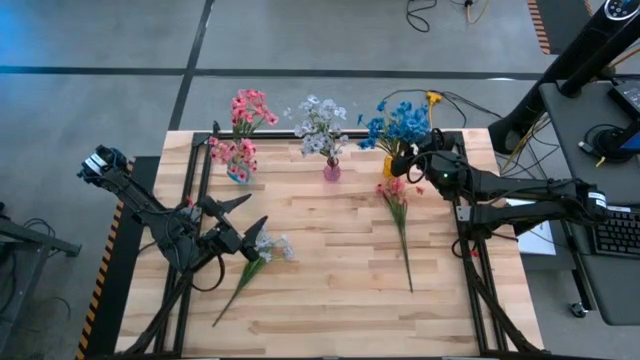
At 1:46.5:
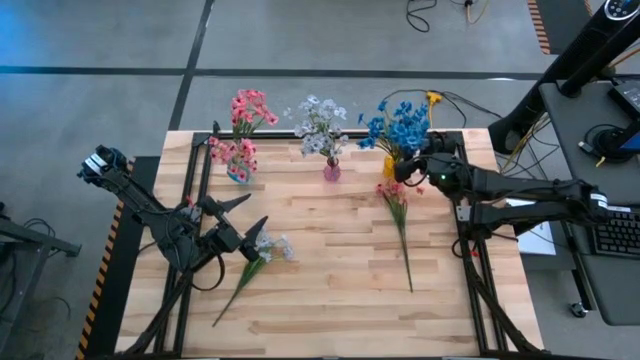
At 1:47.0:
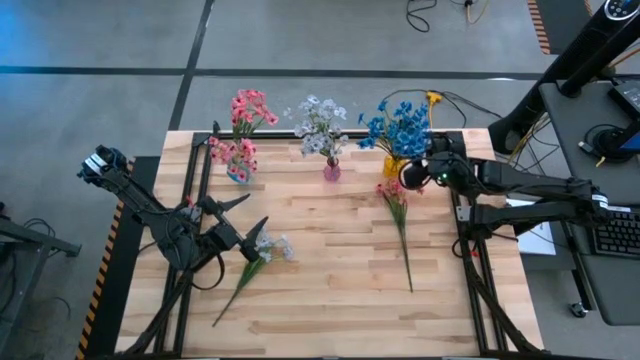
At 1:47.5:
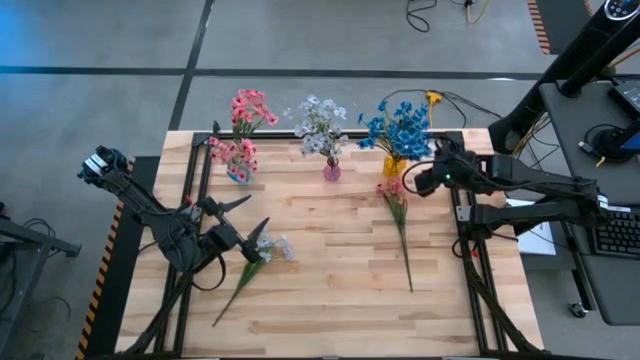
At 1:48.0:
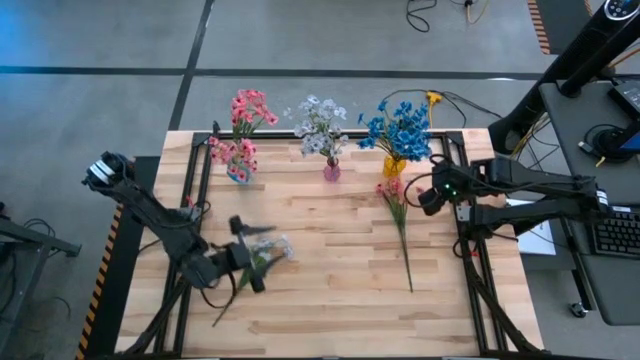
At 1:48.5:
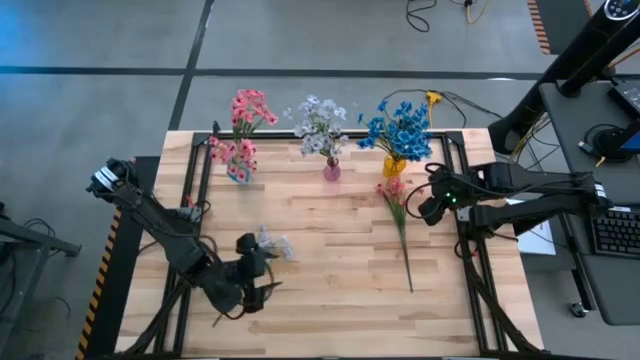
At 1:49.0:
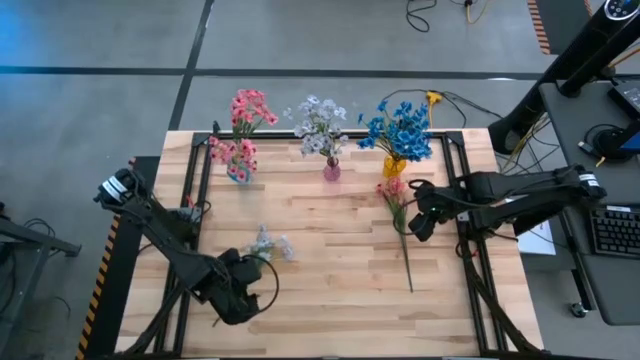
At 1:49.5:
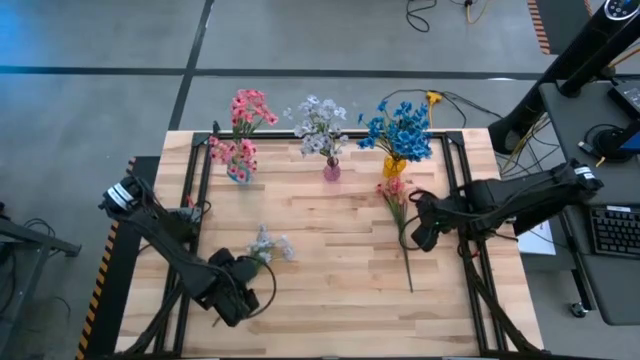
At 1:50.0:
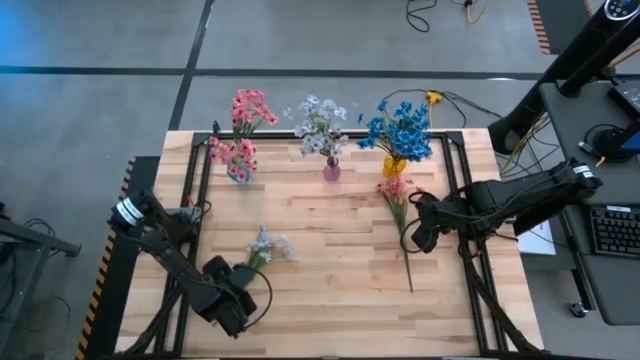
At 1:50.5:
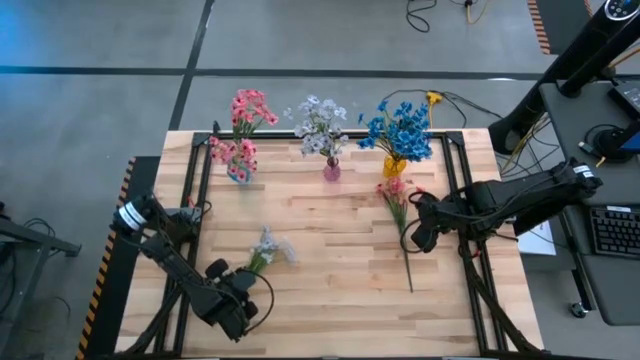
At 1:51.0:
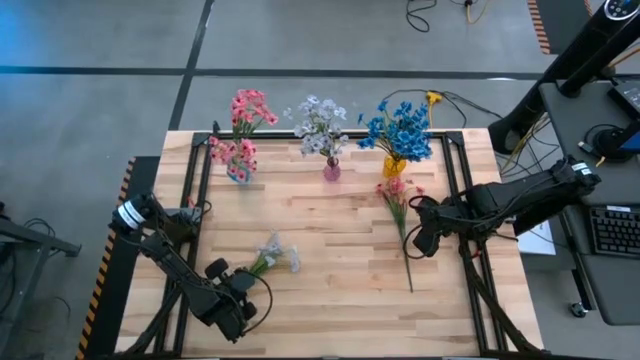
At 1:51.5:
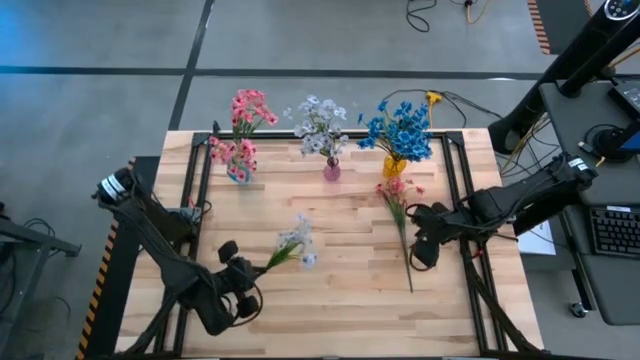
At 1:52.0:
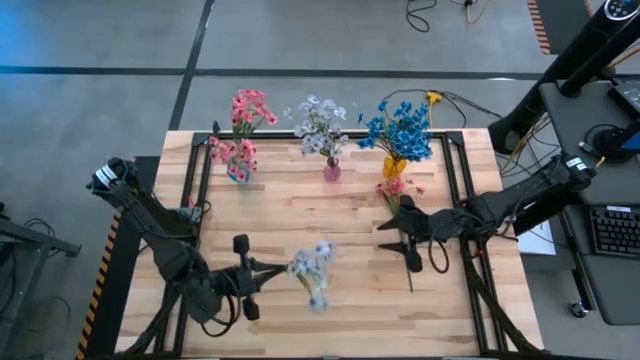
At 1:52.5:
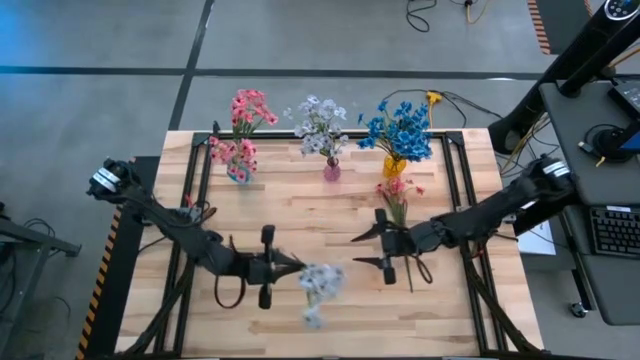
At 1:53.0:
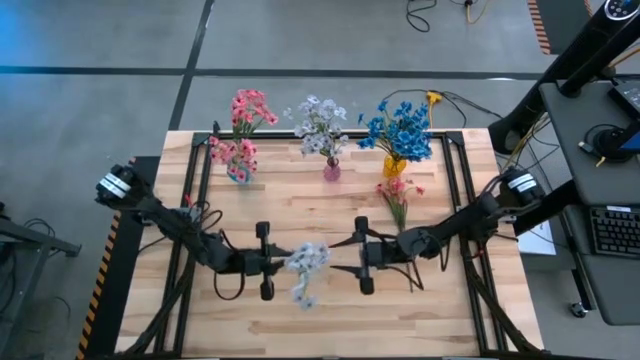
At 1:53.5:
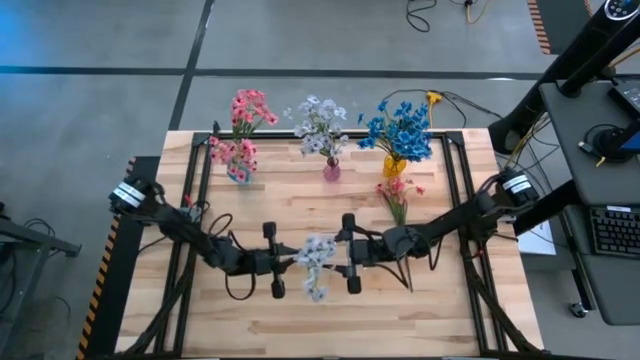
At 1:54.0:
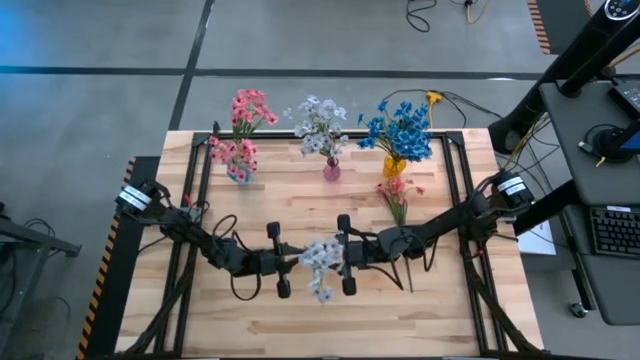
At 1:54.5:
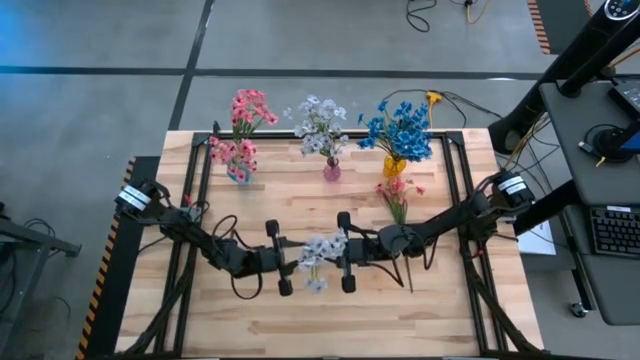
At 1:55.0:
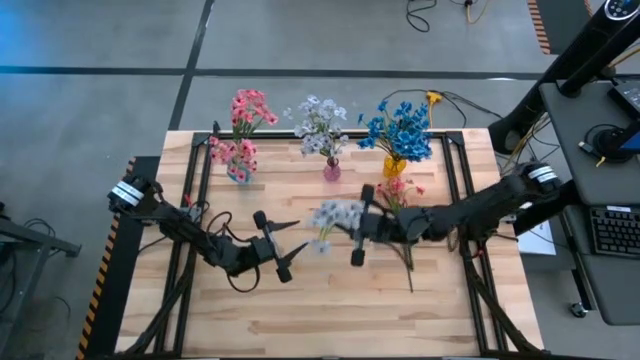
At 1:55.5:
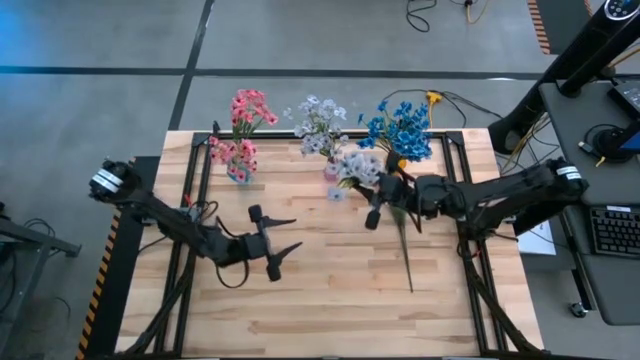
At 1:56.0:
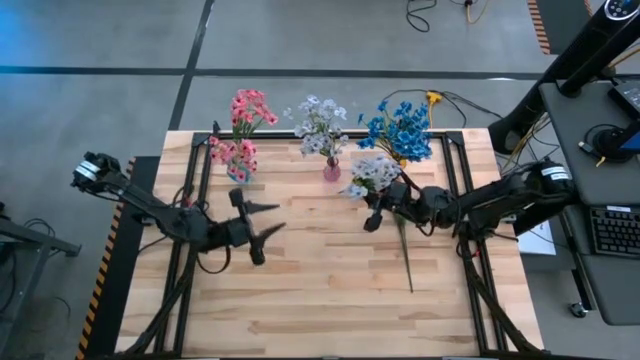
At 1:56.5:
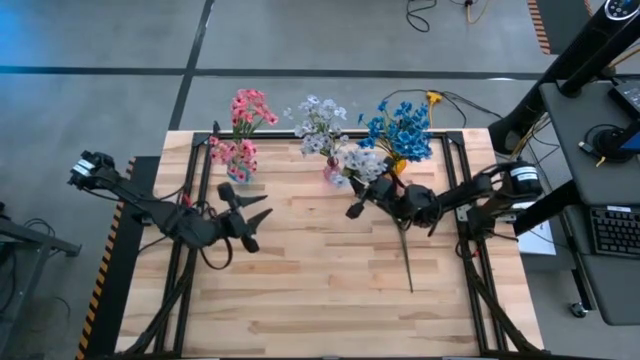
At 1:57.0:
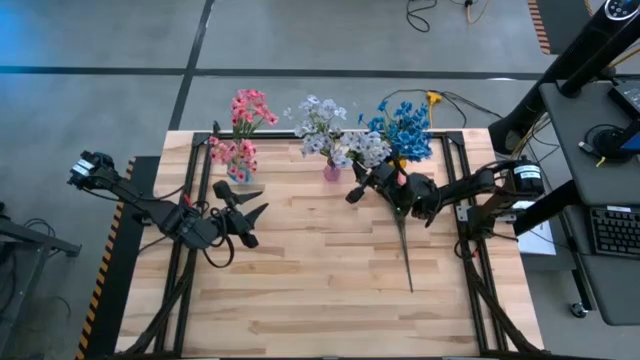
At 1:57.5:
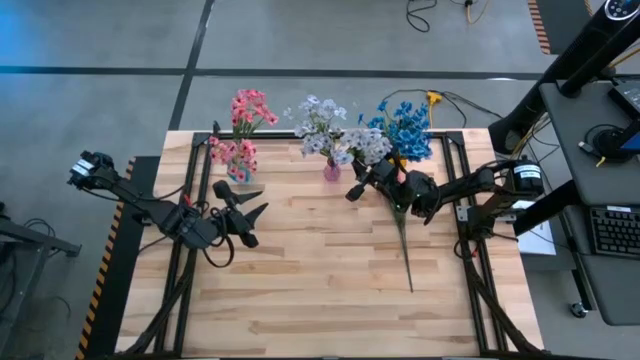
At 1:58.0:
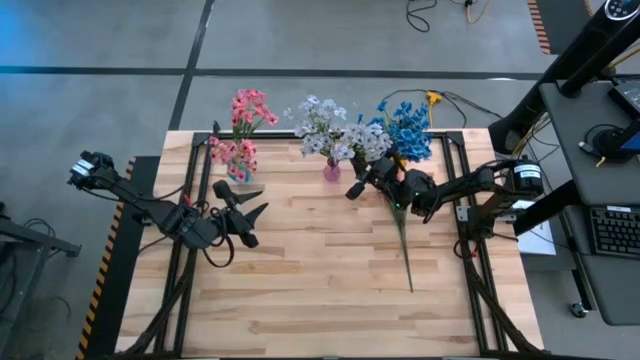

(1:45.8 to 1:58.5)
Task: Sort flowers into vase by color
Put the white flowers into the pink vase

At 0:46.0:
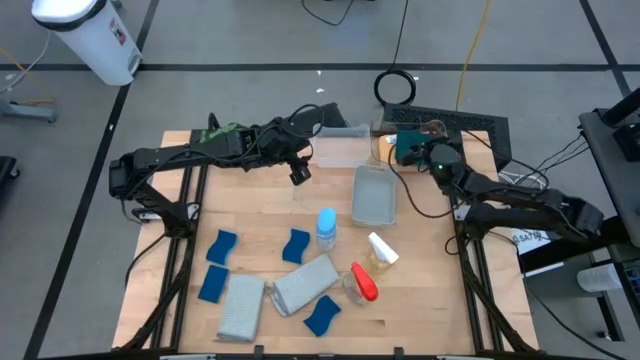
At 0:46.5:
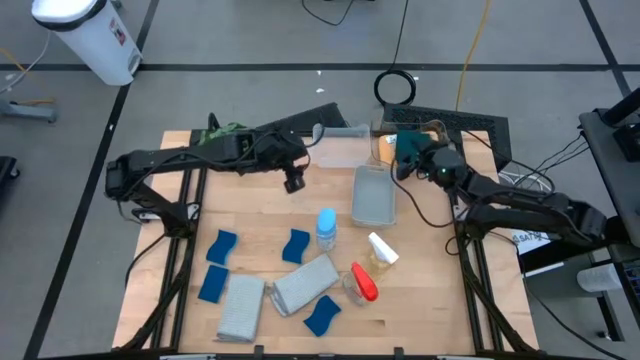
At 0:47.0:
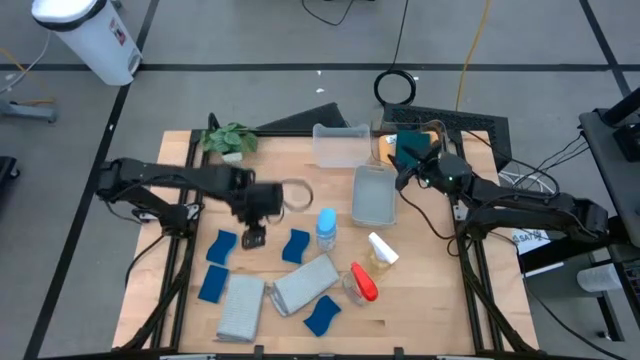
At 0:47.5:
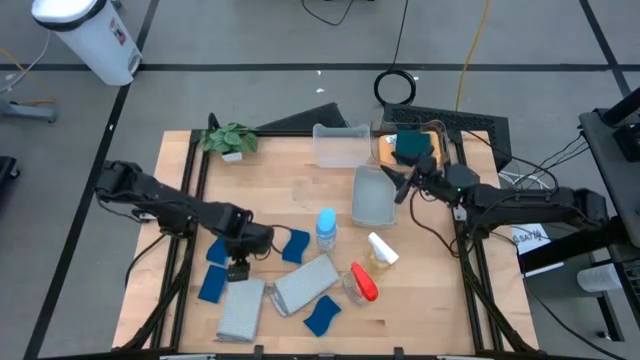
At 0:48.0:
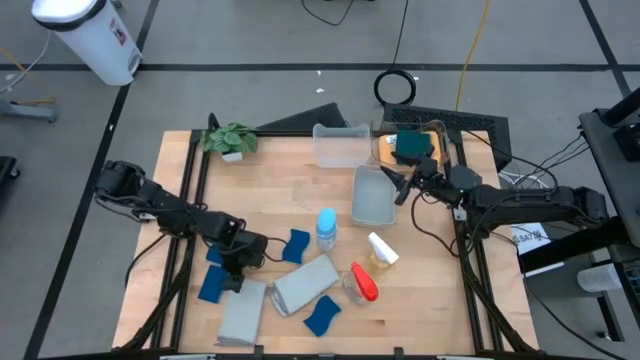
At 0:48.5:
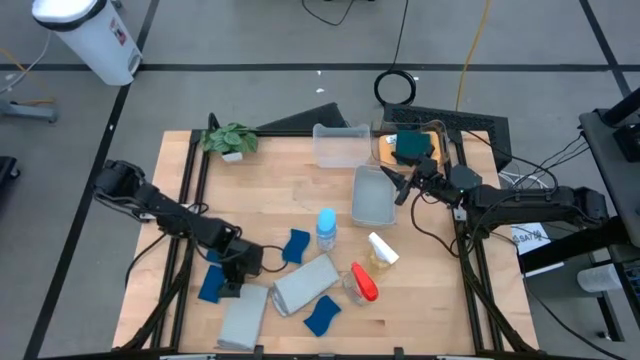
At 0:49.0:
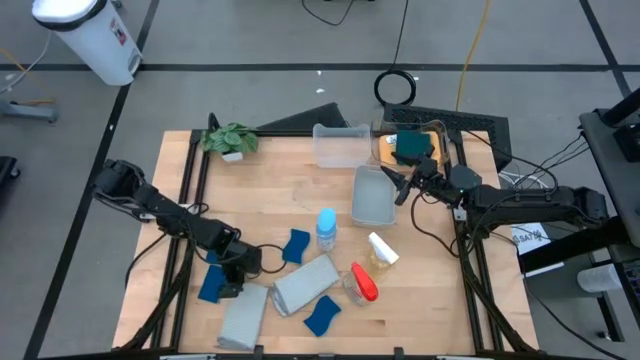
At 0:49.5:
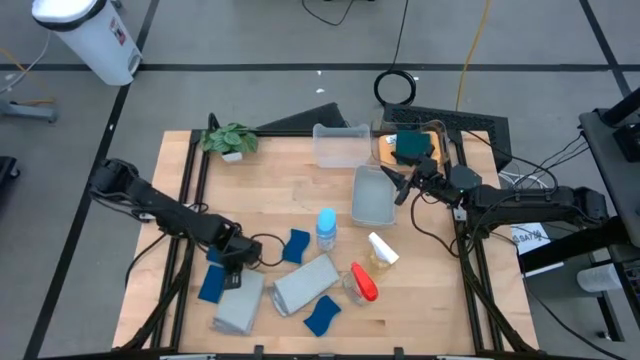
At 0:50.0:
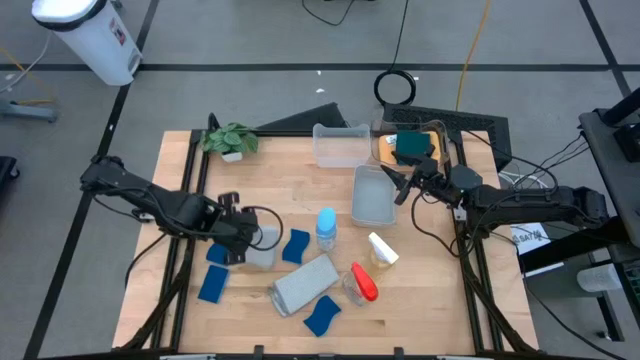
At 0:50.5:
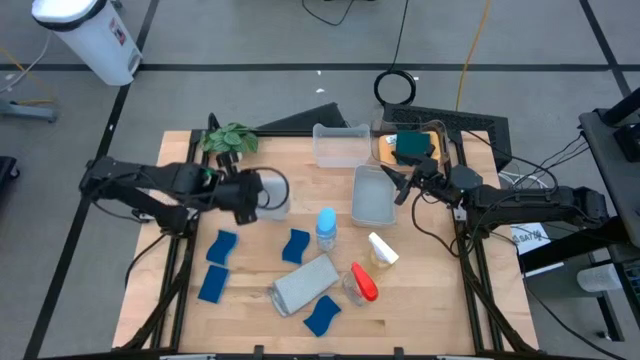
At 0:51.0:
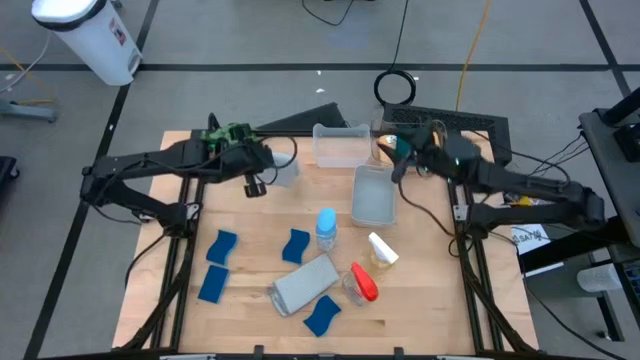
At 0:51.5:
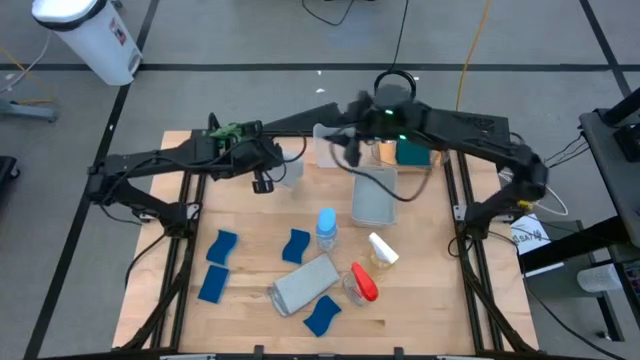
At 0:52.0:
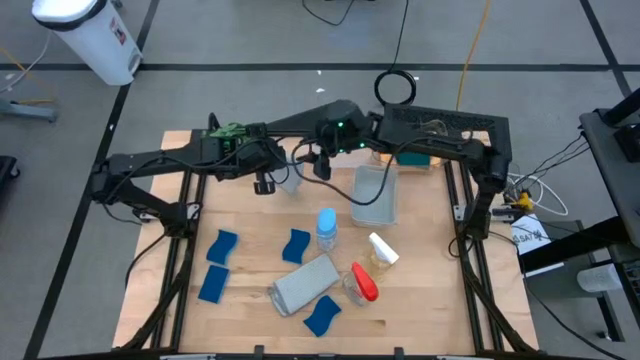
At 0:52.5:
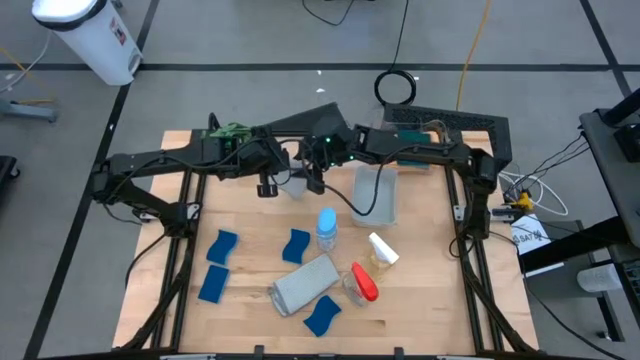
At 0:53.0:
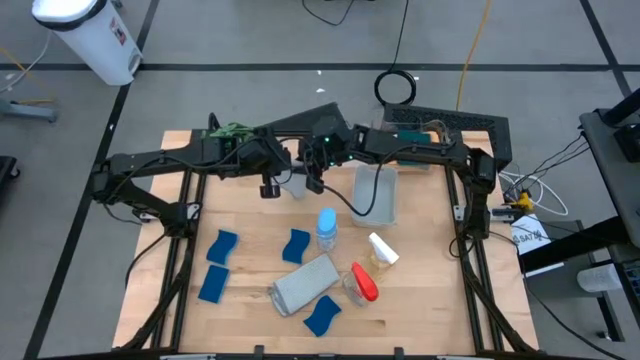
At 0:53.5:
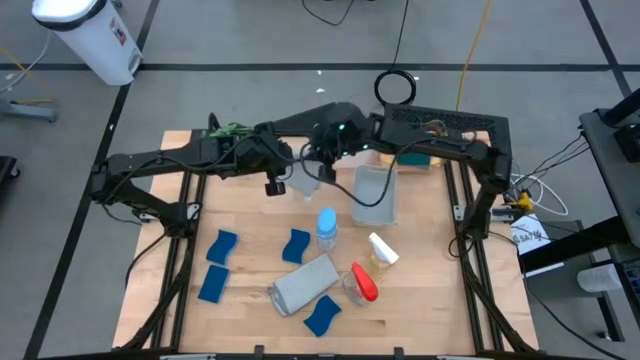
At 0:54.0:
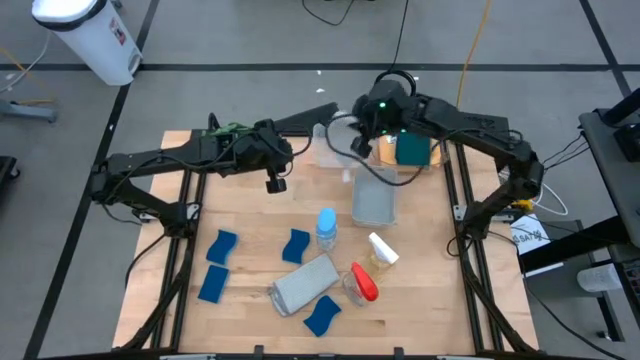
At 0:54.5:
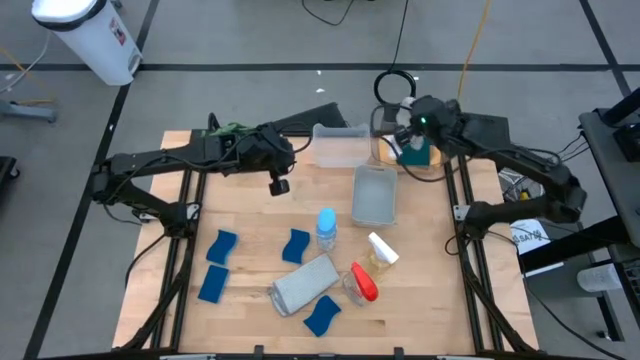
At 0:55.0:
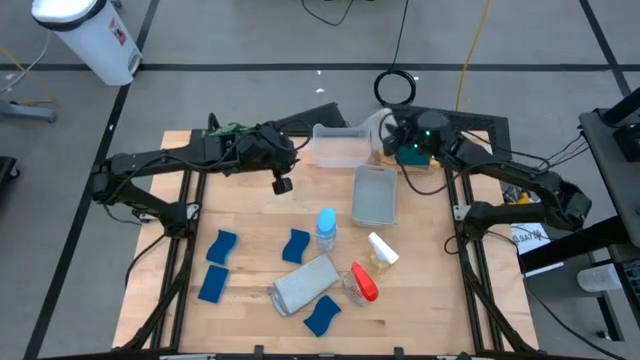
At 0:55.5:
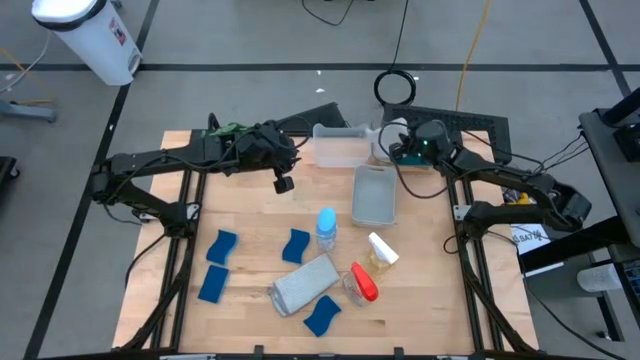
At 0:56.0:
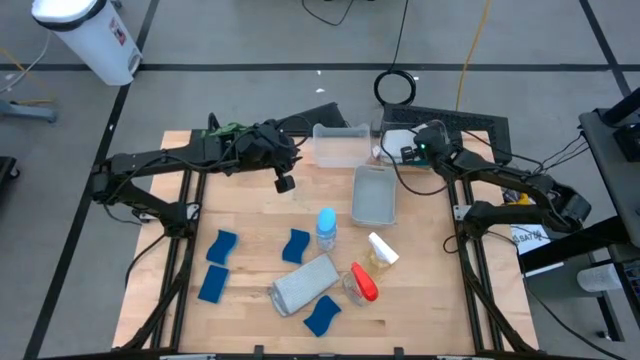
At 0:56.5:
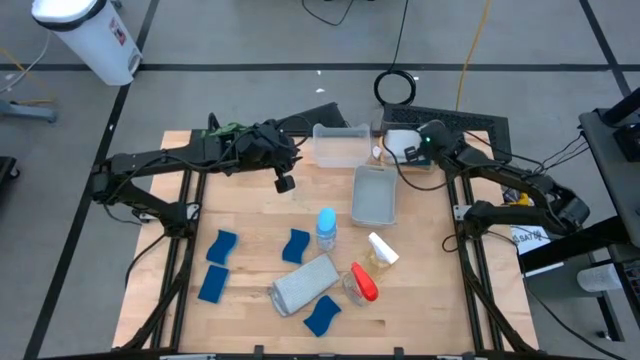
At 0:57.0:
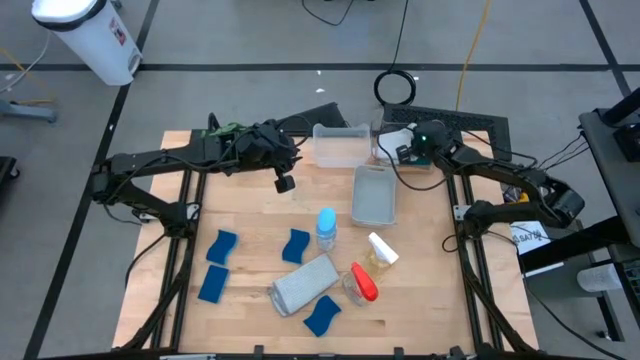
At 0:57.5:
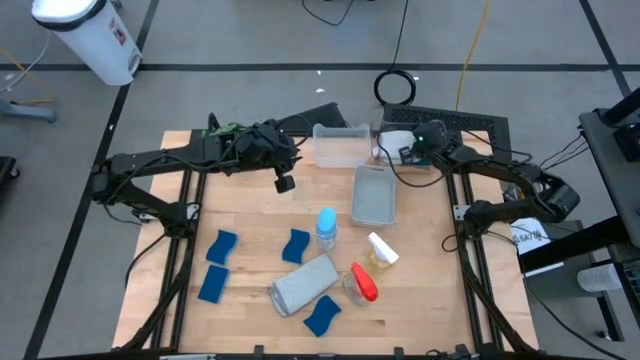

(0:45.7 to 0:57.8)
Task: Pick & Place Kitchen Items
Put the gray towel into the transparent bin
